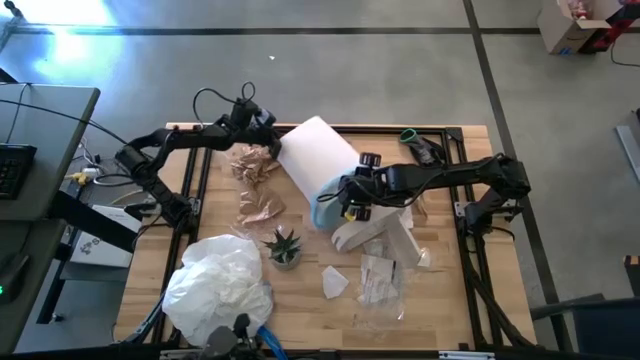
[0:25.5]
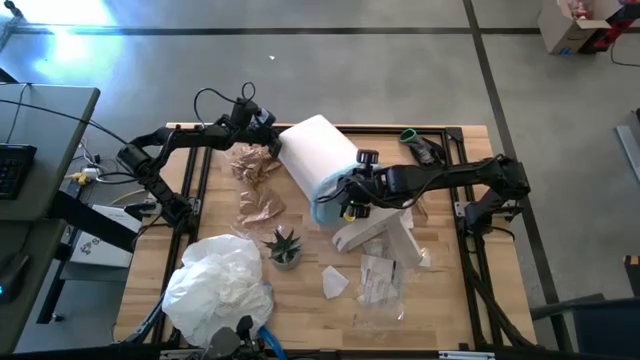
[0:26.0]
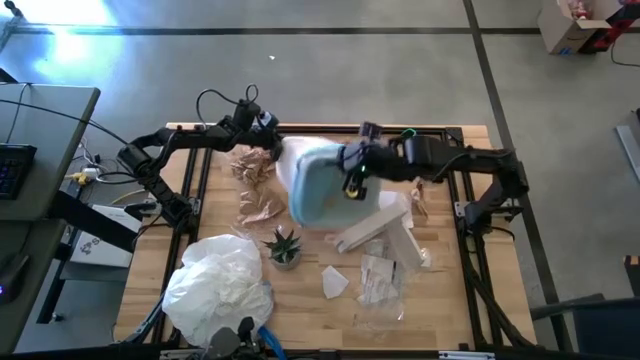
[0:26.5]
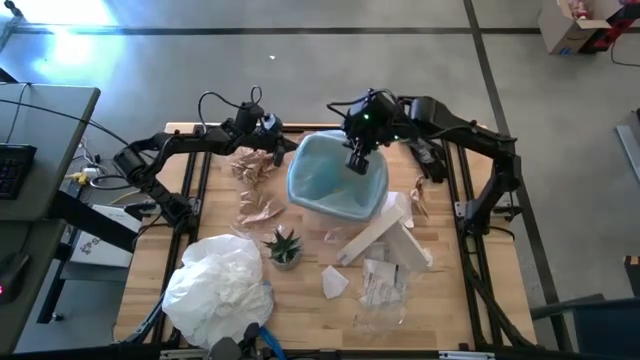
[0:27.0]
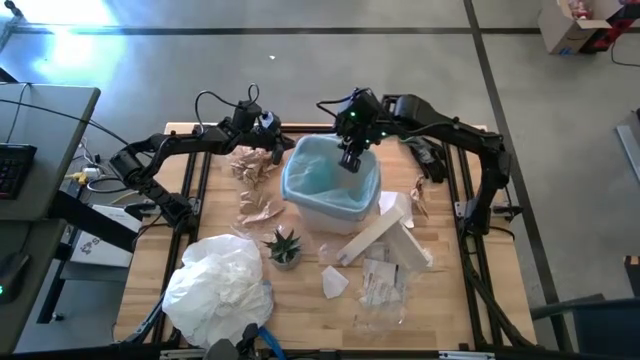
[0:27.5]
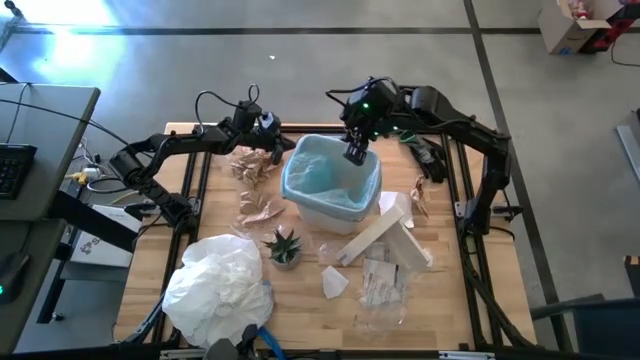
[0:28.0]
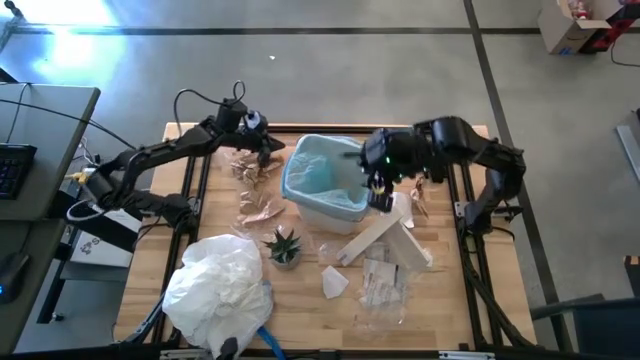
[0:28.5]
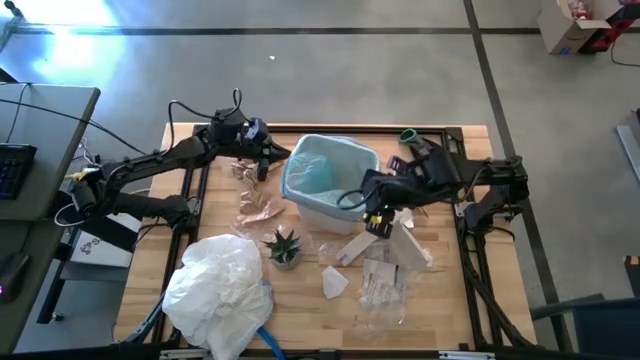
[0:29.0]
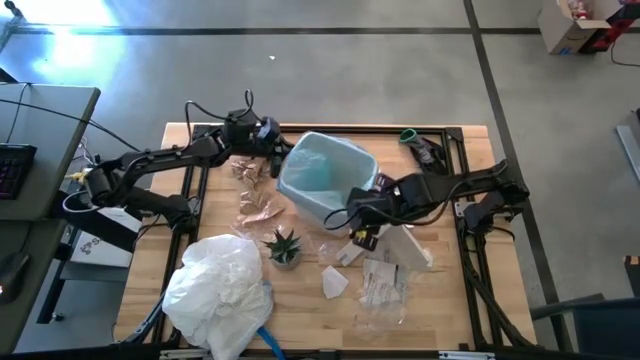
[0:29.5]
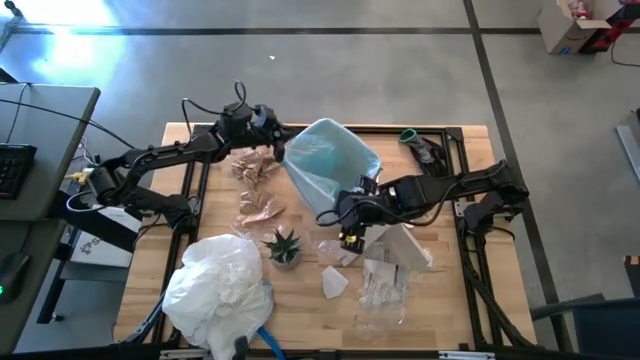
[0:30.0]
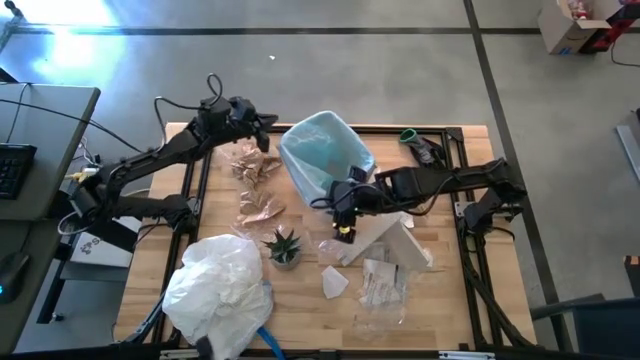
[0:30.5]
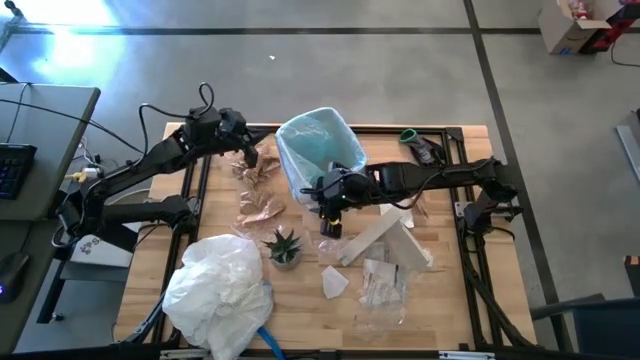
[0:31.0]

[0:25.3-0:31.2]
Task: place trash/remove bag and relplace
Adjust the trash bin

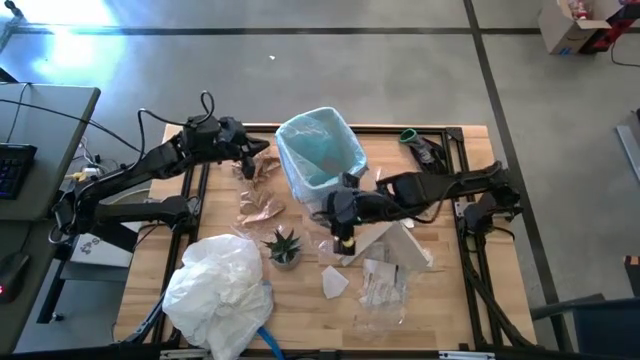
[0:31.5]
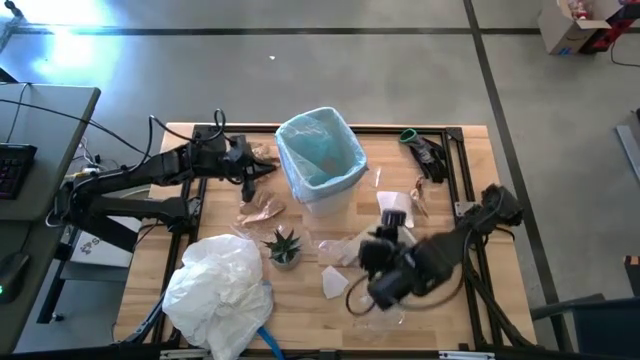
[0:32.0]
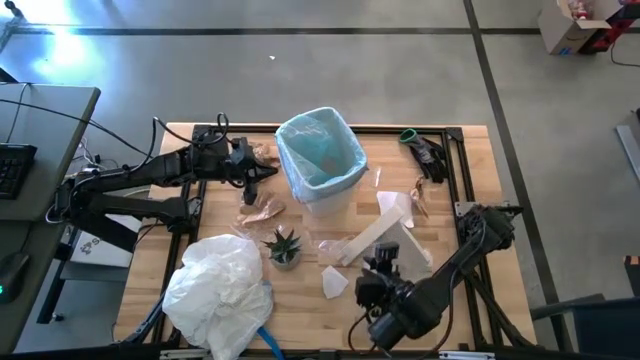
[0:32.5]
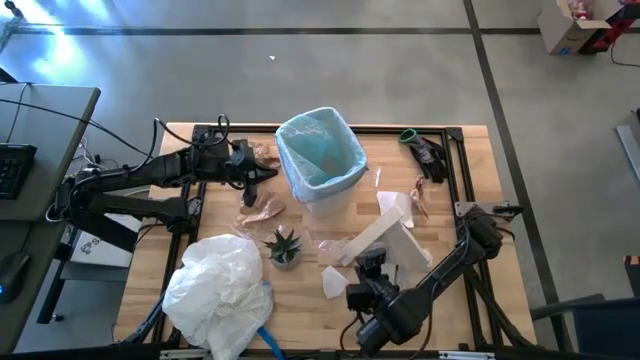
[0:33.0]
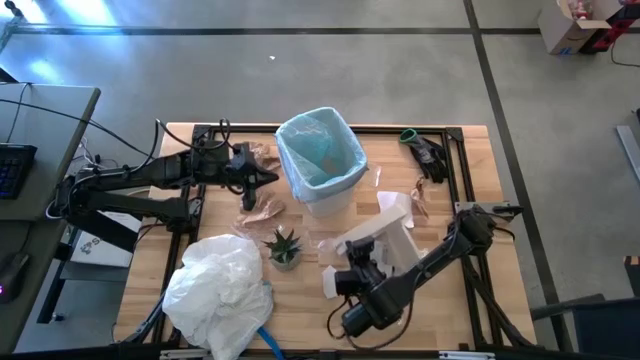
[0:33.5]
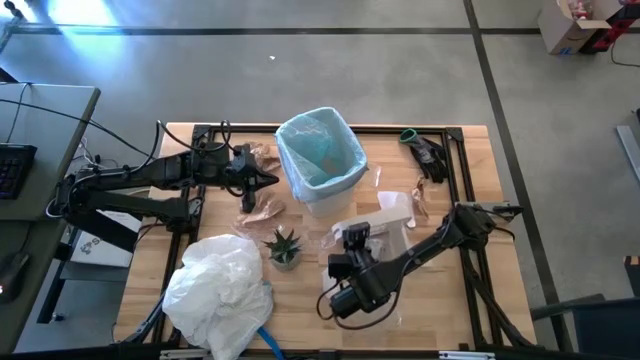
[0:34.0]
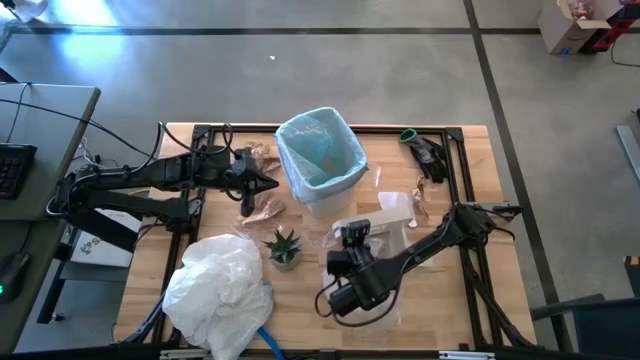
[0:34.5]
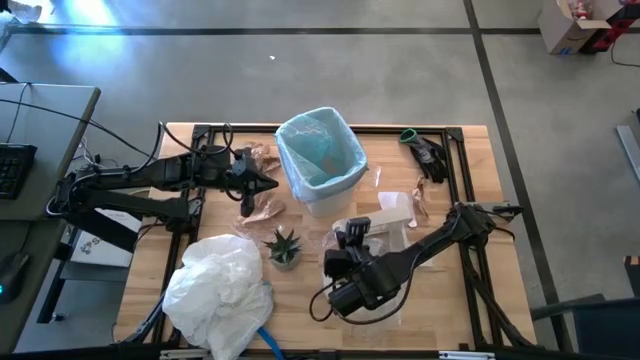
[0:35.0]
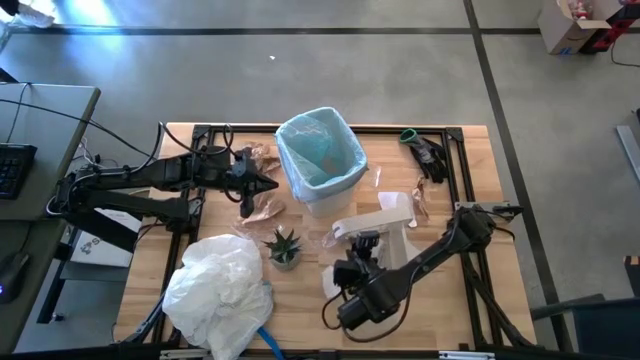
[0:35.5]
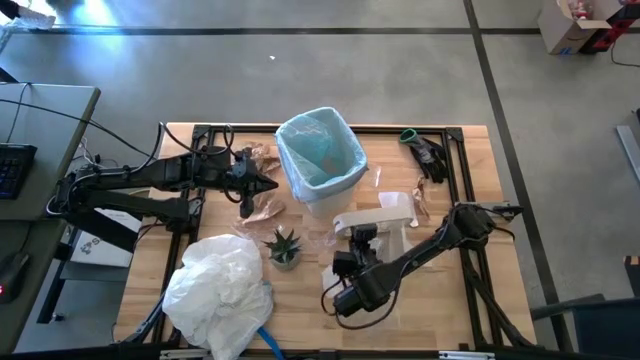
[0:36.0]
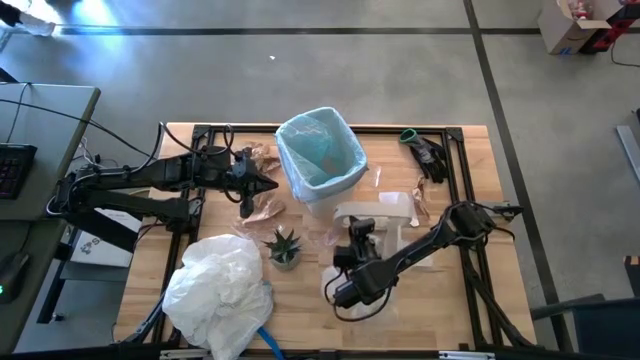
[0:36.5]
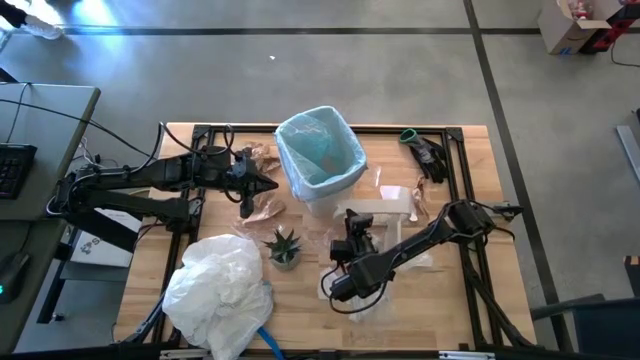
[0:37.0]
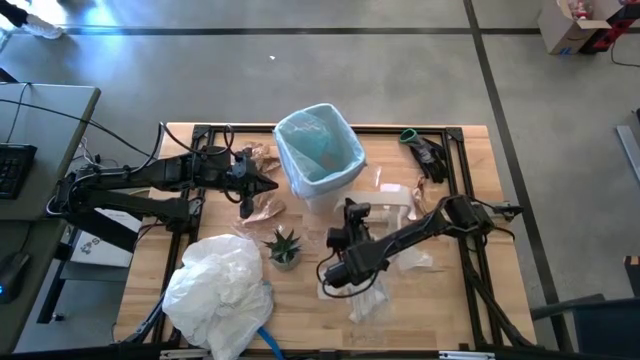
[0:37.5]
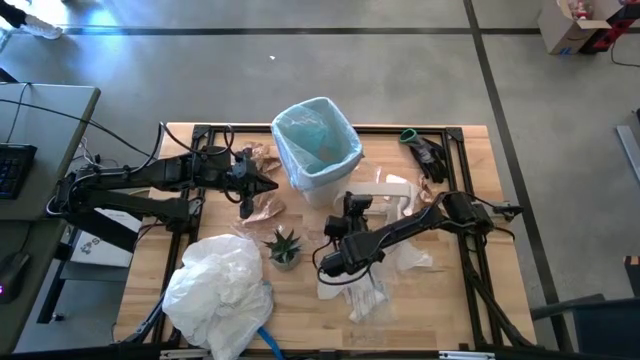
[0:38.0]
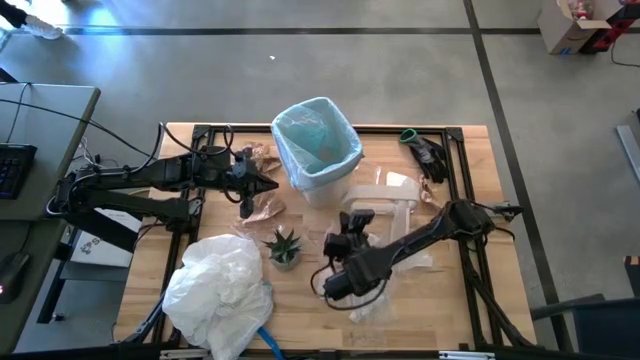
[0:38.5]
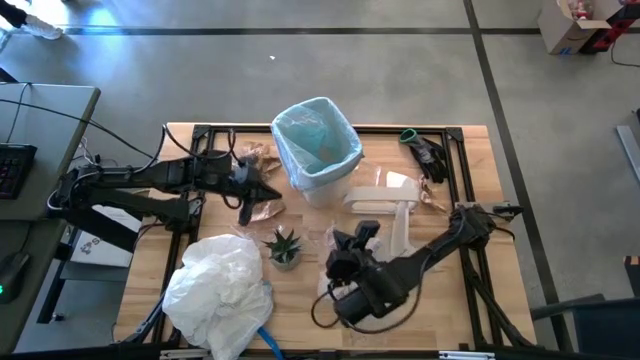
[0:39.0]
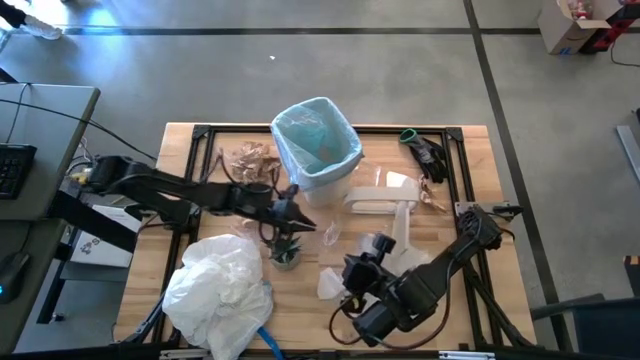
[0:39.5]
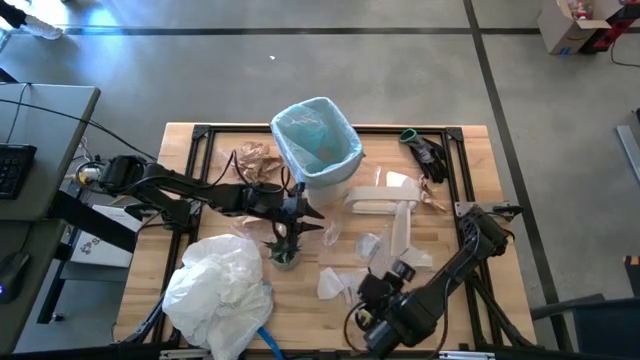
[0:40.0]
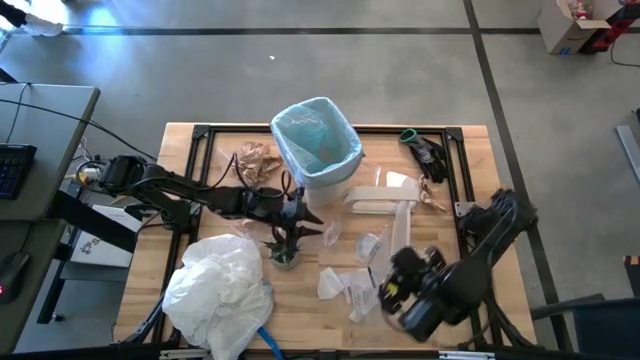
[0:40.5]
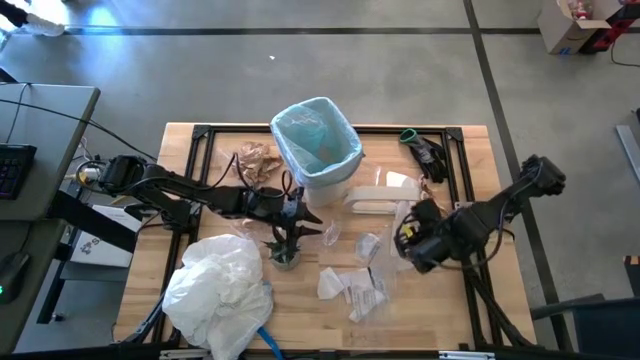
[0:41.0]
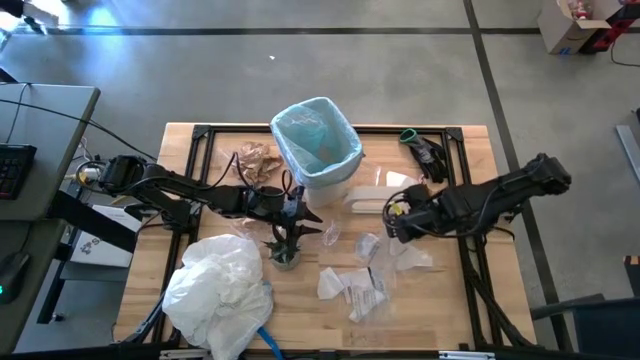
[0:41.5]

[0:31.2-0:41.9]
Adjust the trash bin

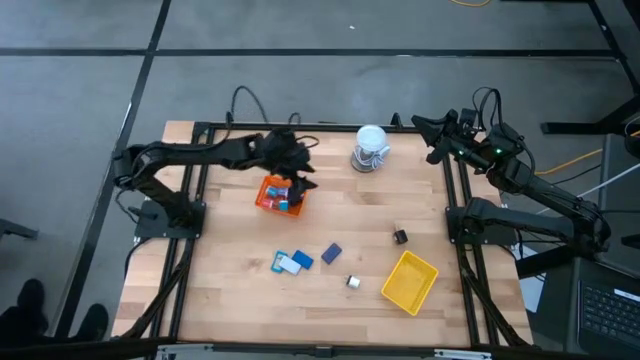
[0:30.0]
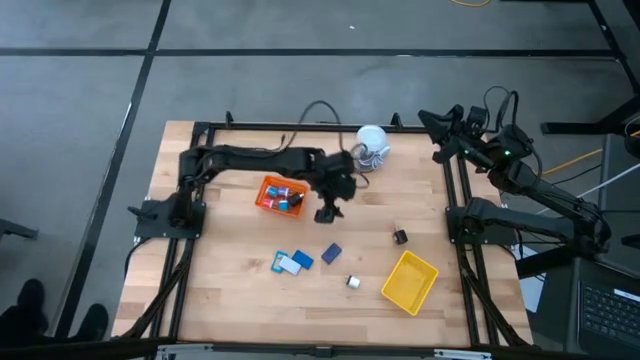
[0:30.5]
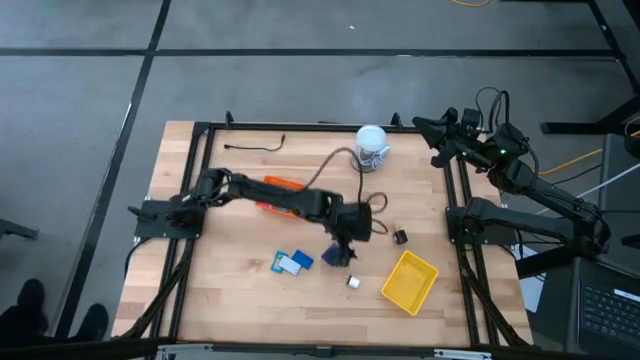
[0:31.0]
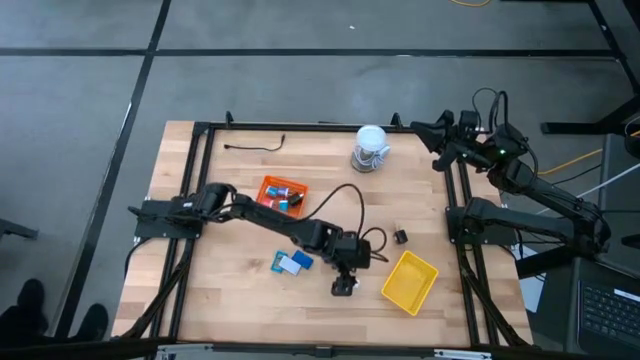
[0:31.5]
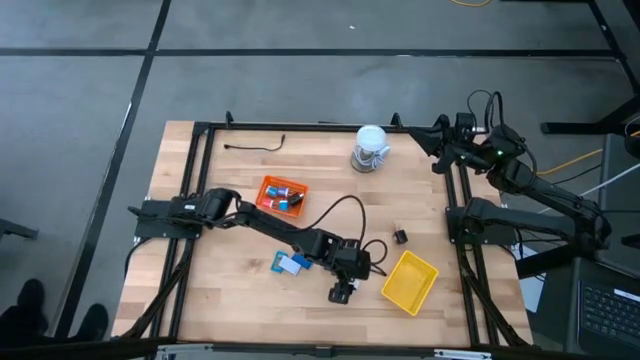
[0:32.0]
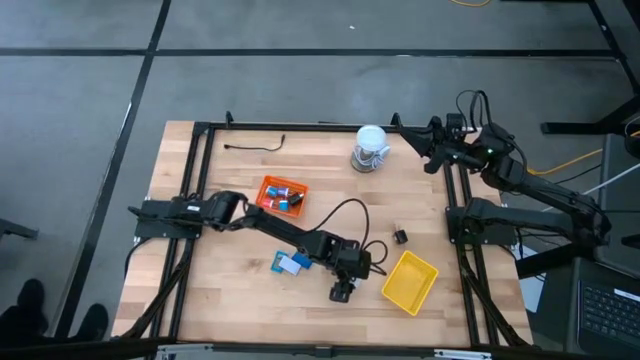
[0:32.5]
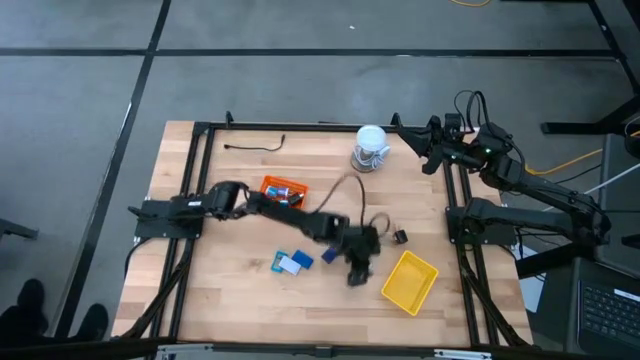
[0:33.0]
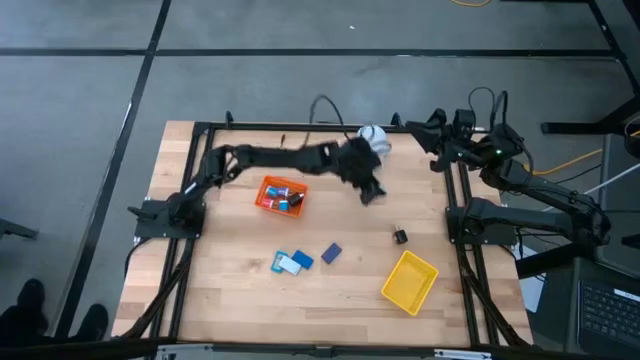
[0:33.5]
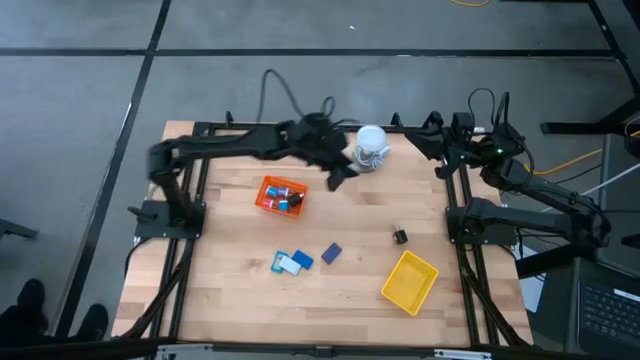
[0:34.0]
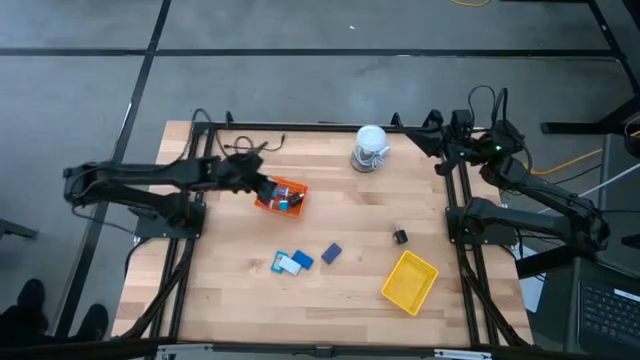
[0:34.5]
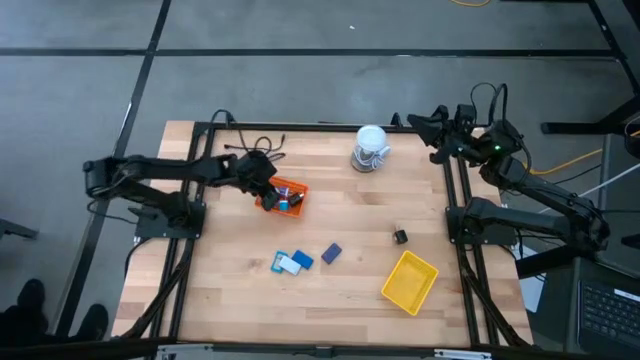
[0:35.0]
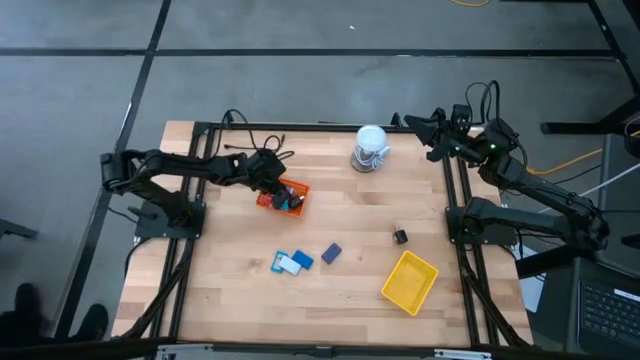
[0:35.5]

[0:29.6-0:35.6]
Task: Pick & Place Office items
Put the white charger adapter into the orange basket
